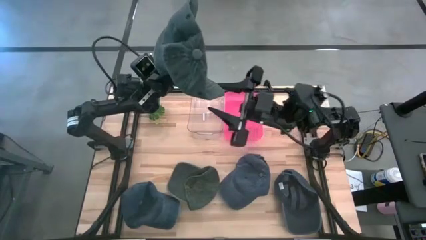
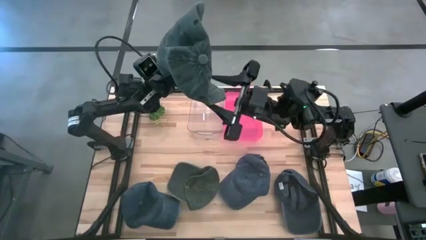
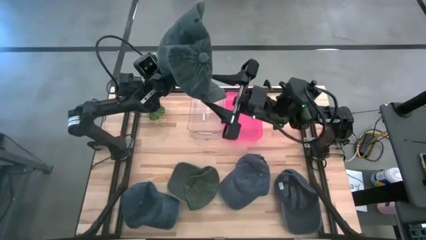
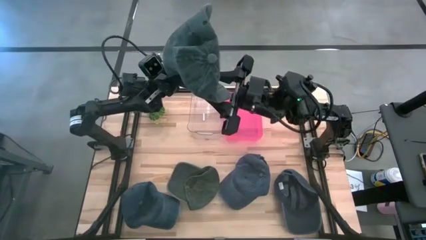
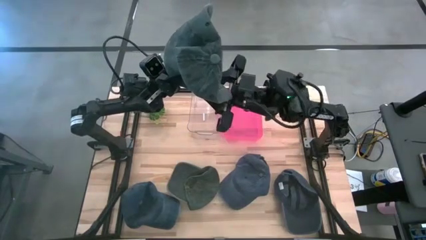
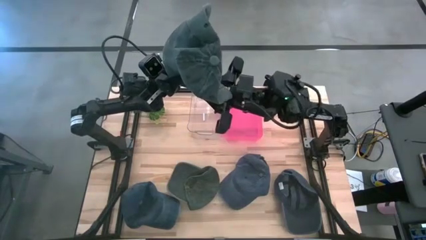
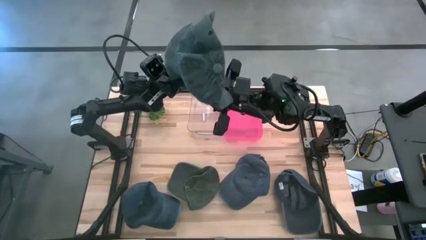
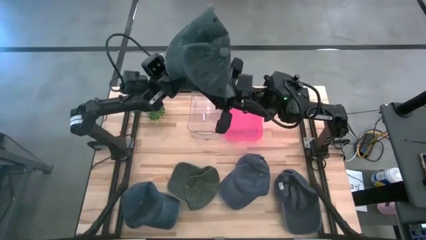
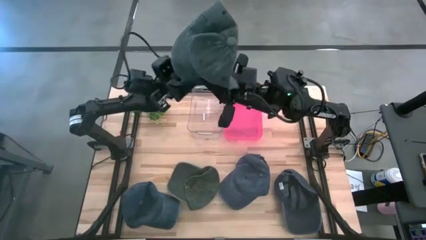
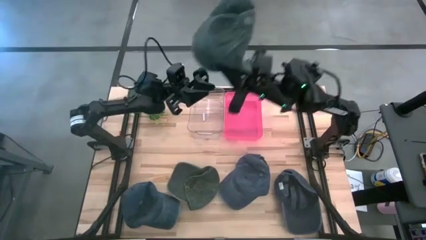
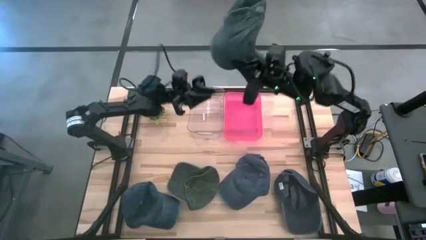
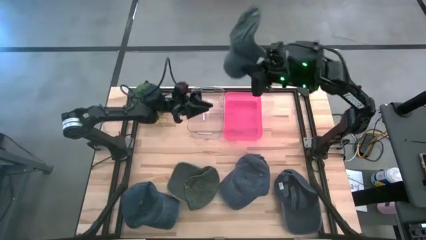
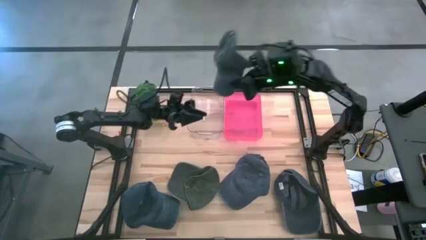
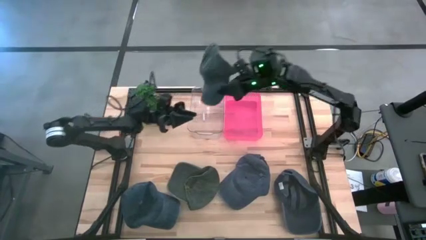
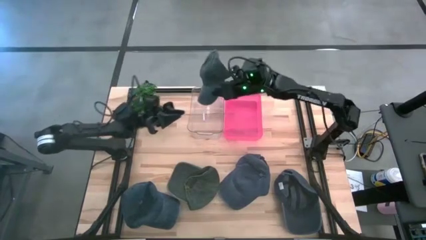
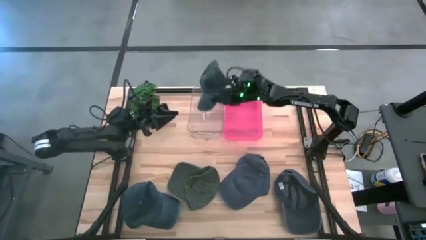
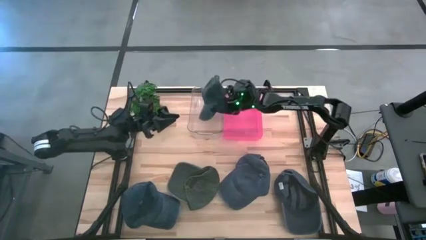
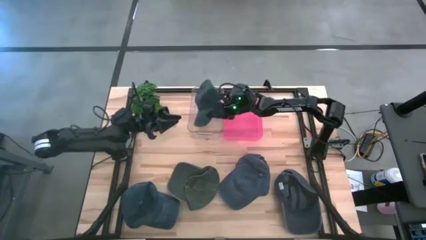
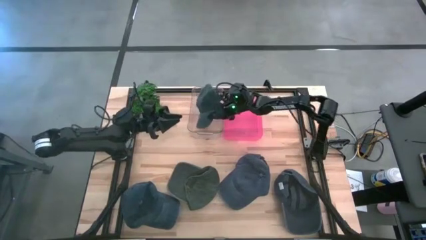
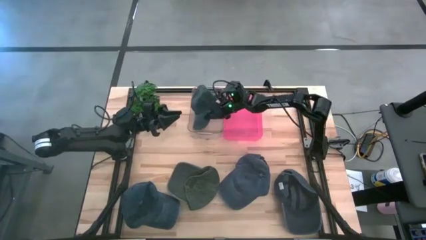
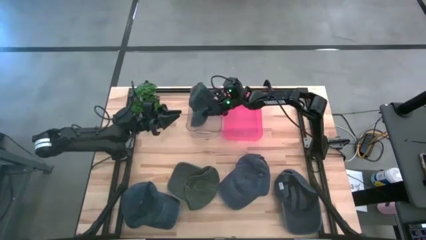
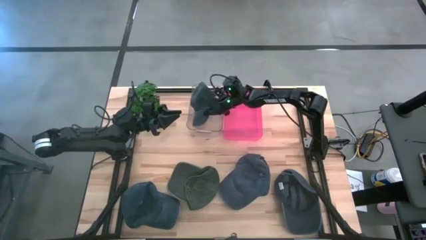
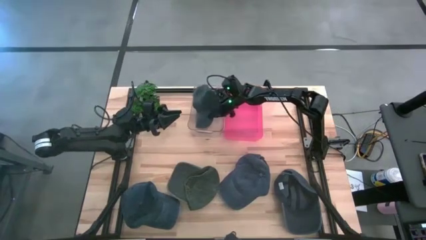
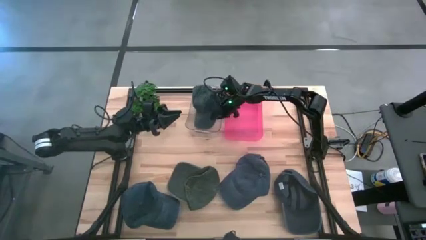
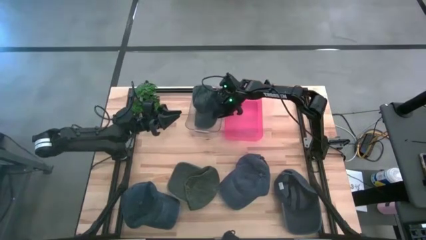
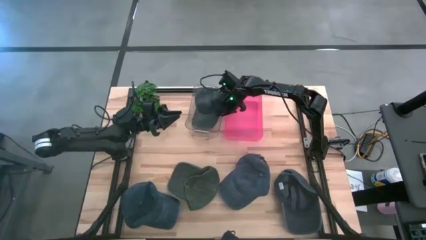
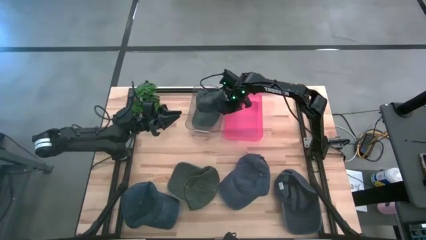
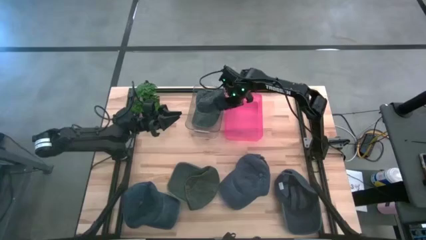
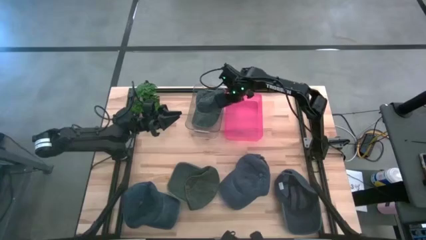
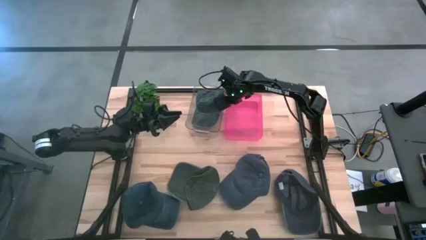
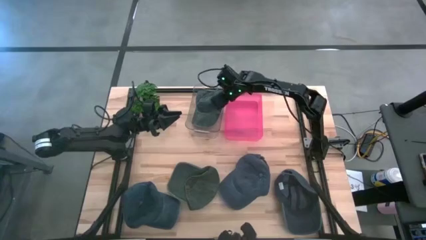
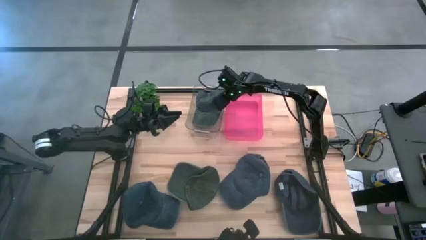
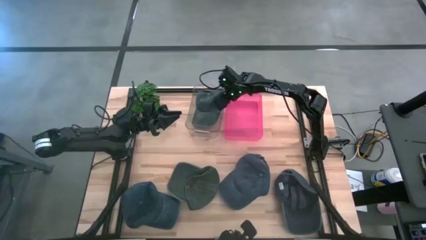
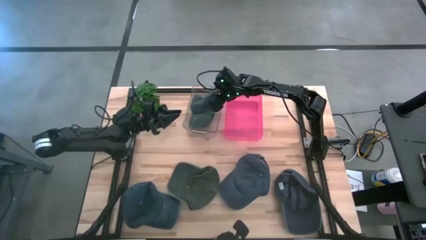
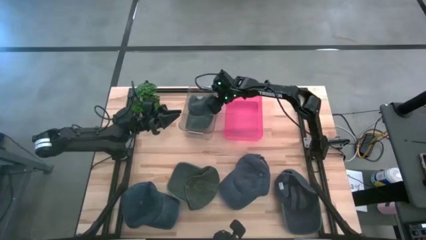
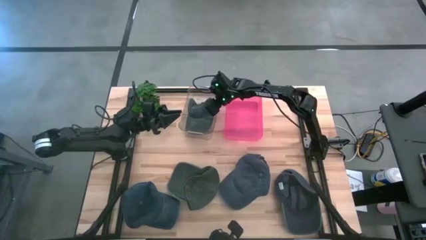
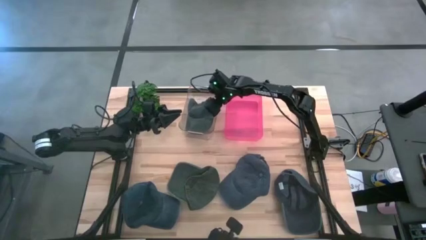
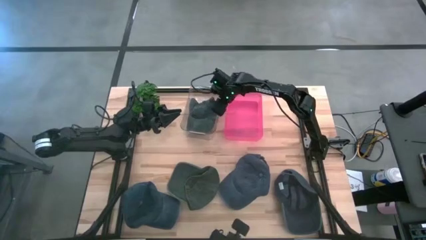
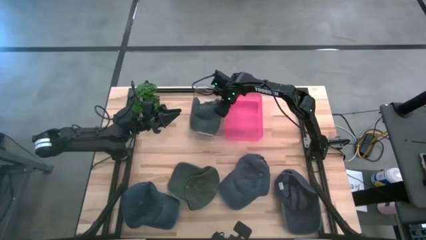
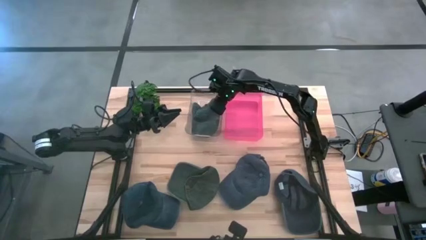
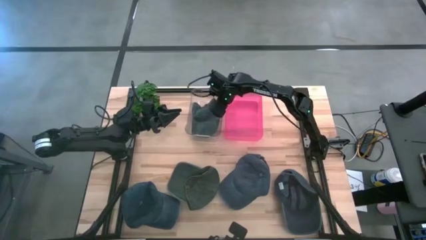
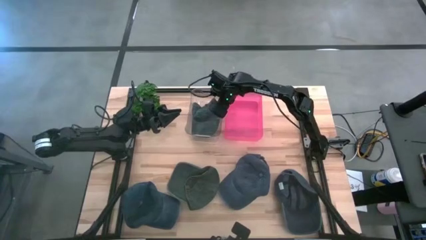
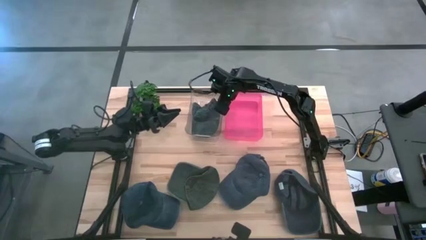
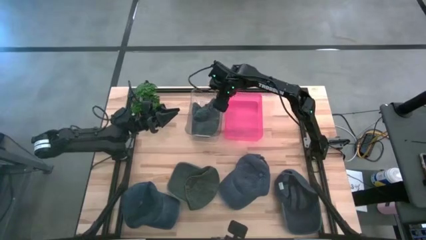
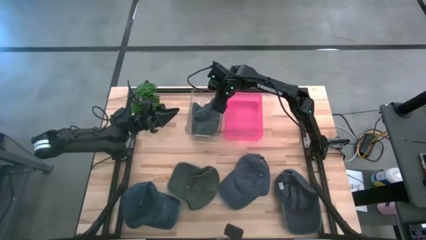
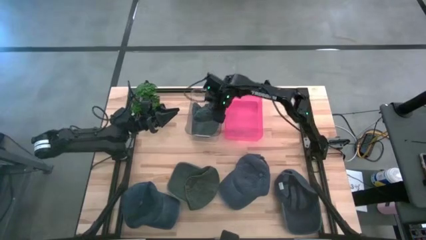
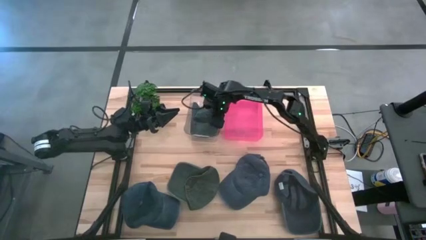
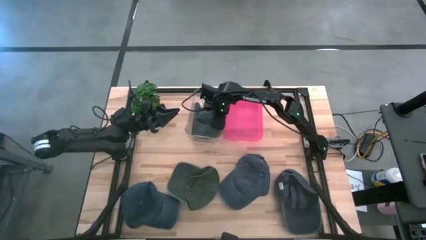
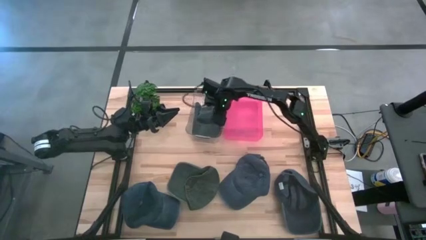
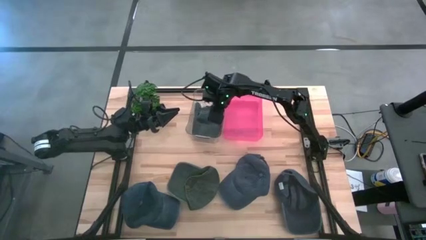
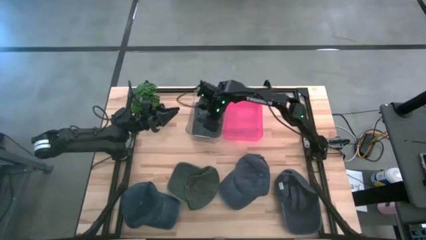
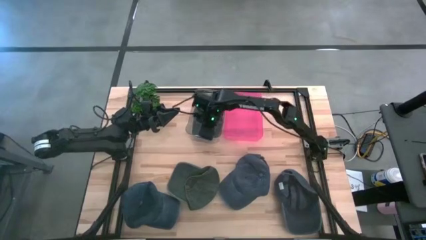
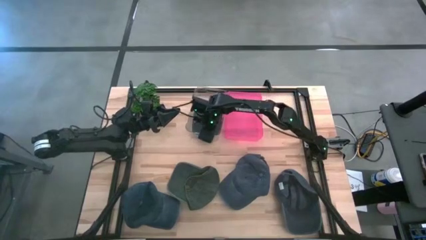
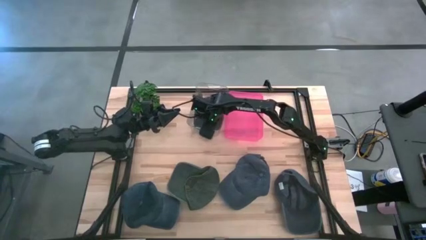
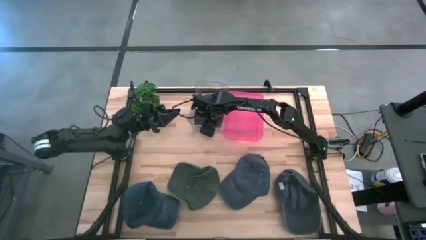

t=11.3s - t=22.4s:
Task: Pick & Place hat
Put the right black cap into the transparent bin
